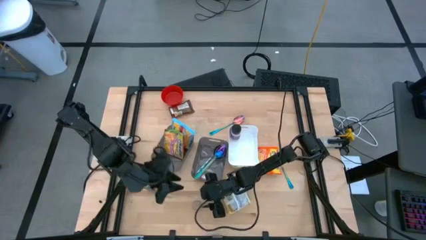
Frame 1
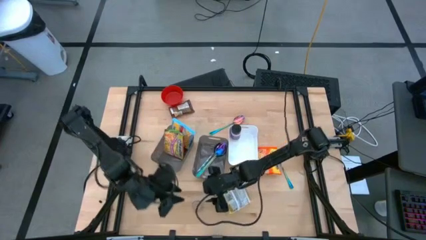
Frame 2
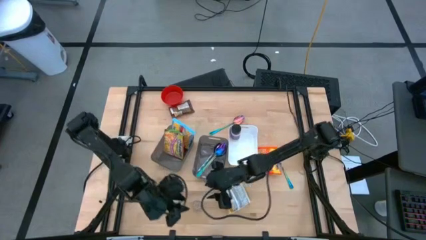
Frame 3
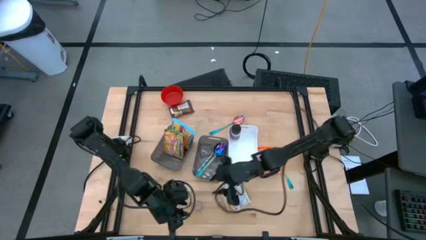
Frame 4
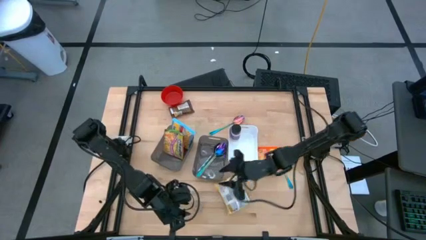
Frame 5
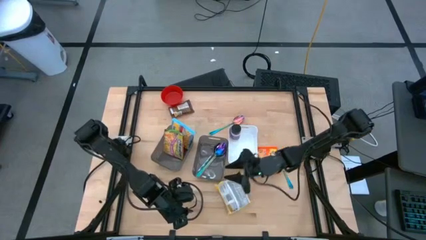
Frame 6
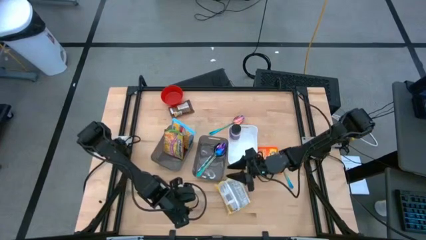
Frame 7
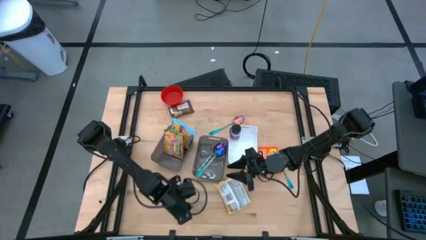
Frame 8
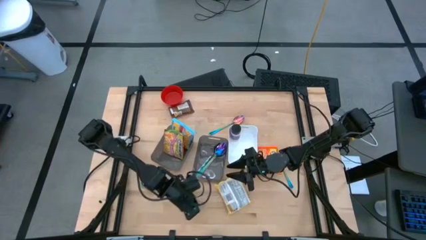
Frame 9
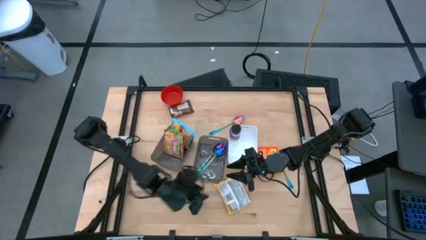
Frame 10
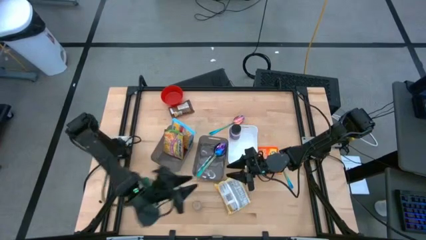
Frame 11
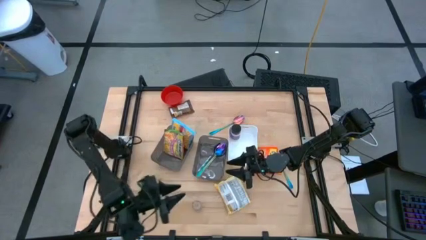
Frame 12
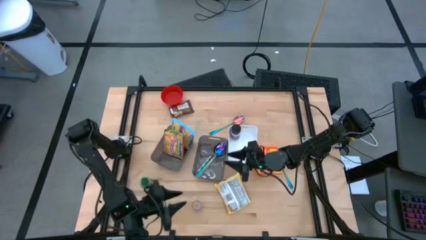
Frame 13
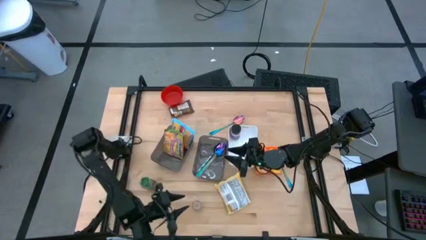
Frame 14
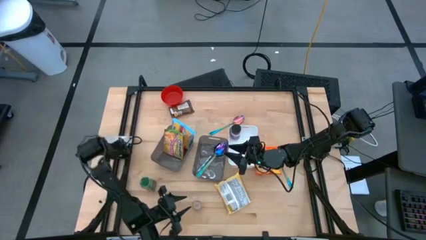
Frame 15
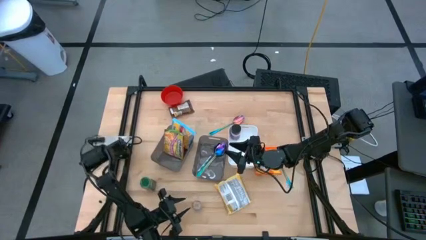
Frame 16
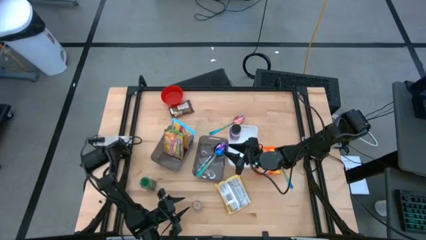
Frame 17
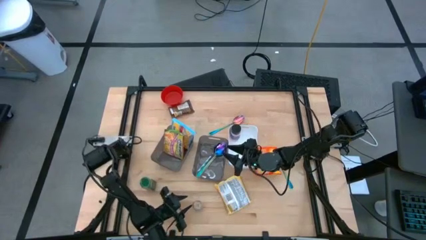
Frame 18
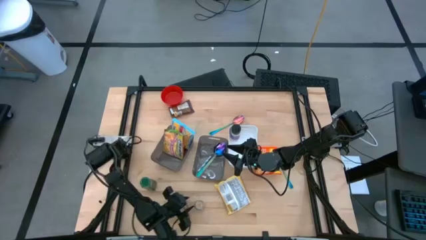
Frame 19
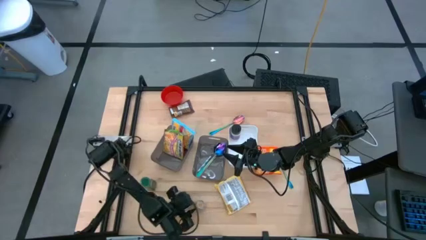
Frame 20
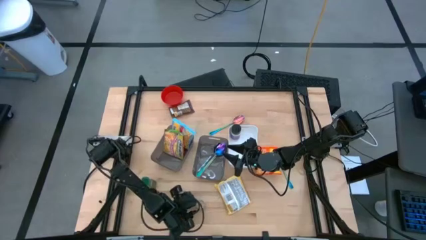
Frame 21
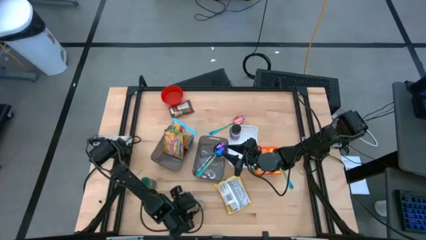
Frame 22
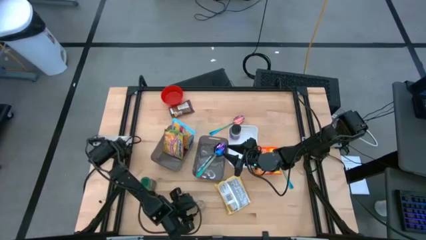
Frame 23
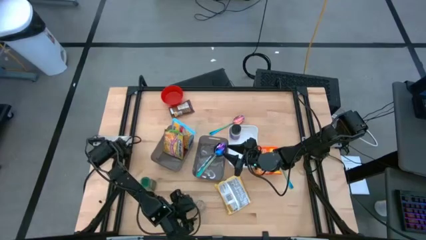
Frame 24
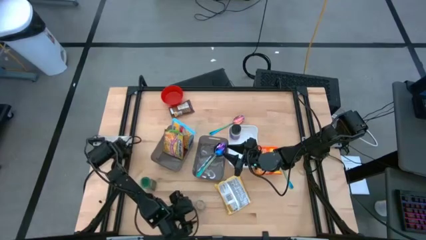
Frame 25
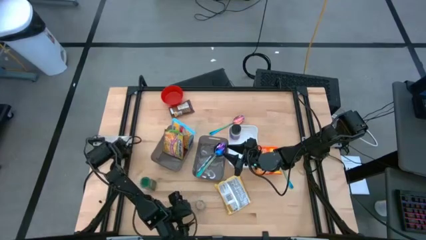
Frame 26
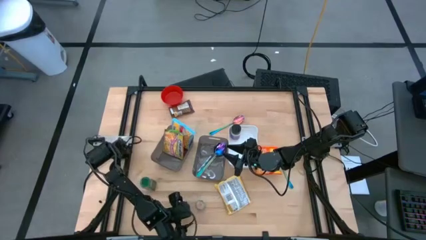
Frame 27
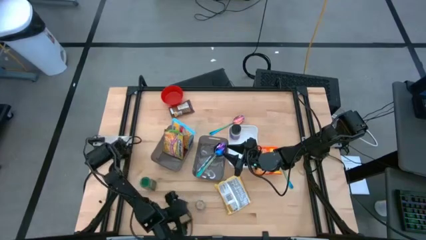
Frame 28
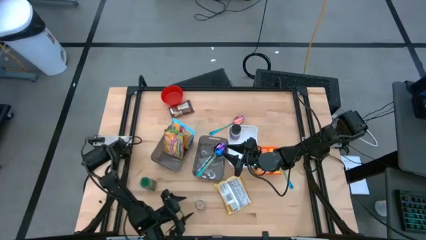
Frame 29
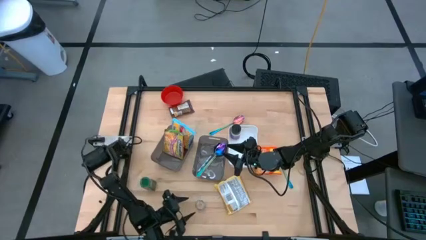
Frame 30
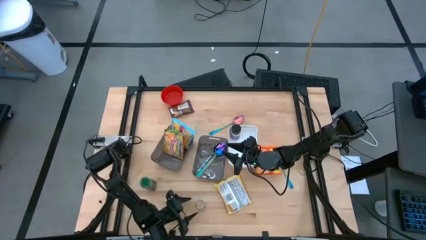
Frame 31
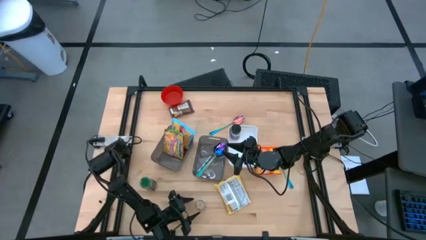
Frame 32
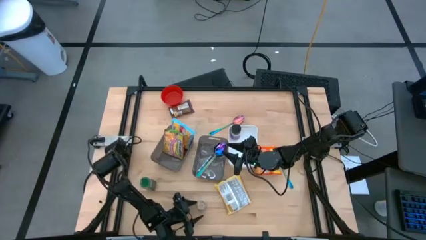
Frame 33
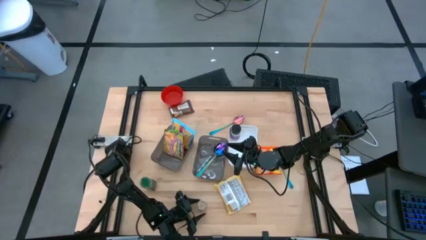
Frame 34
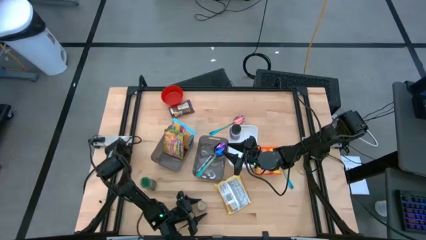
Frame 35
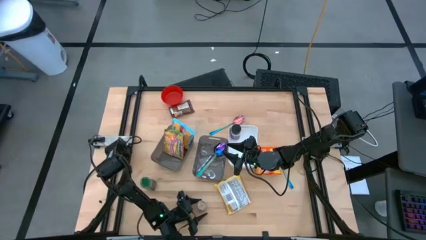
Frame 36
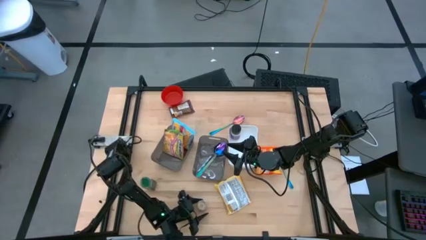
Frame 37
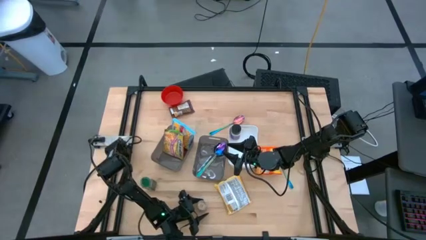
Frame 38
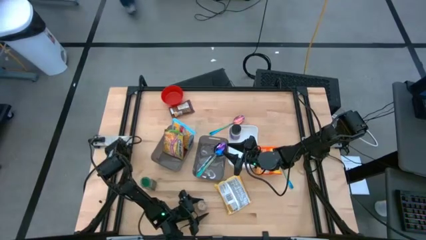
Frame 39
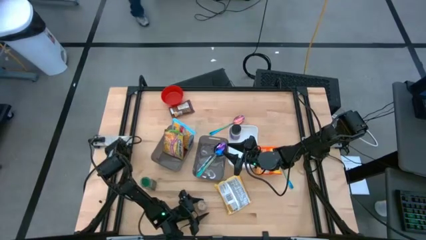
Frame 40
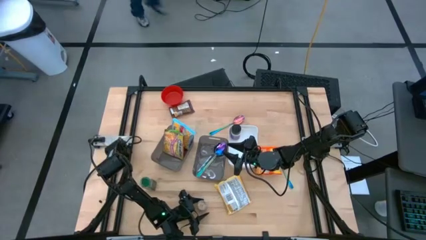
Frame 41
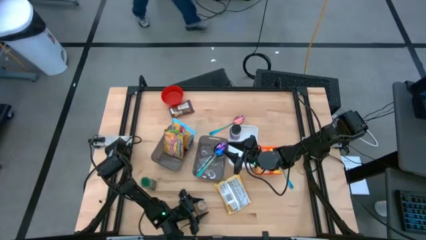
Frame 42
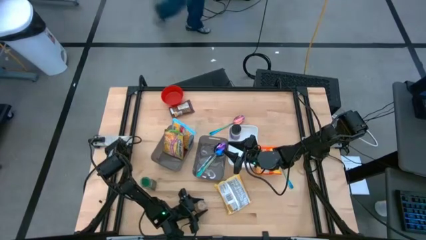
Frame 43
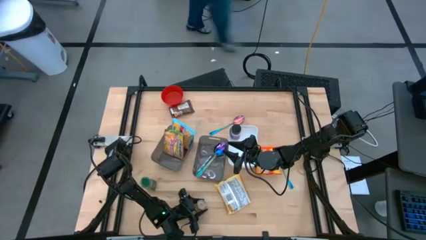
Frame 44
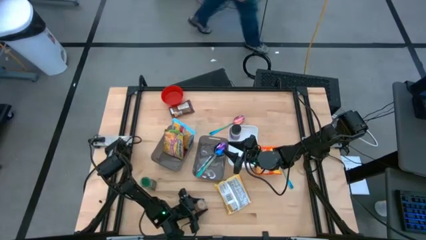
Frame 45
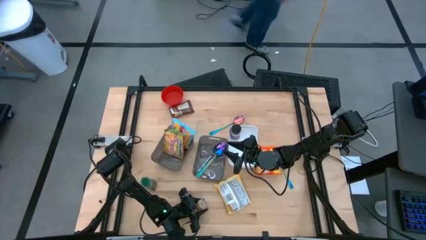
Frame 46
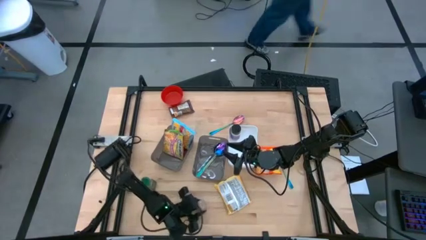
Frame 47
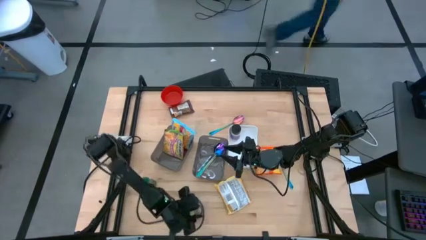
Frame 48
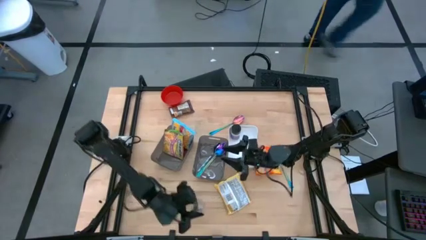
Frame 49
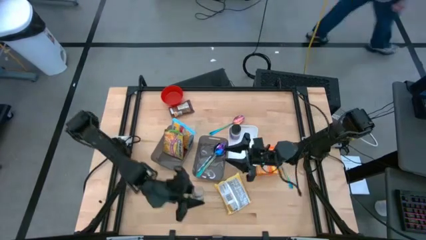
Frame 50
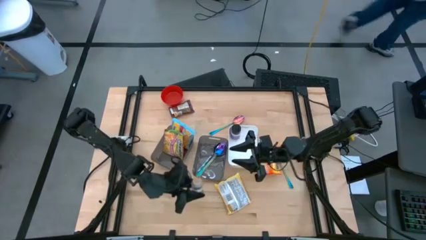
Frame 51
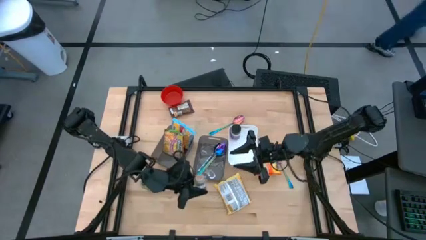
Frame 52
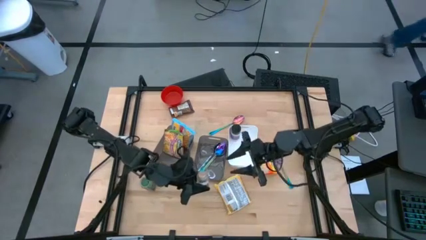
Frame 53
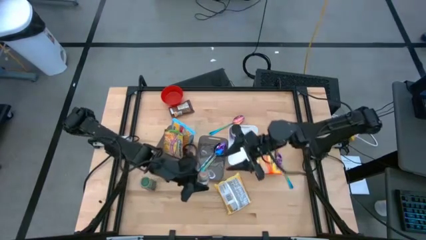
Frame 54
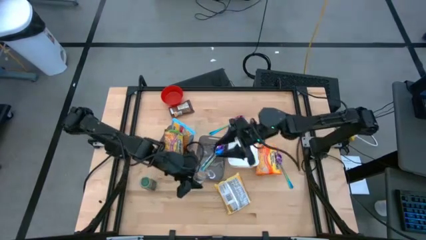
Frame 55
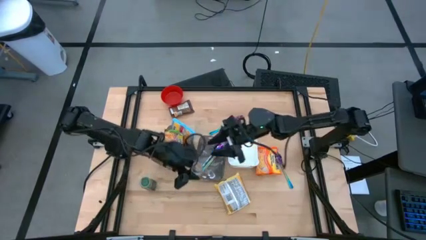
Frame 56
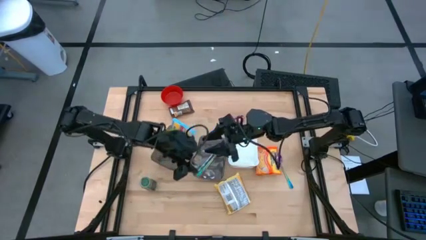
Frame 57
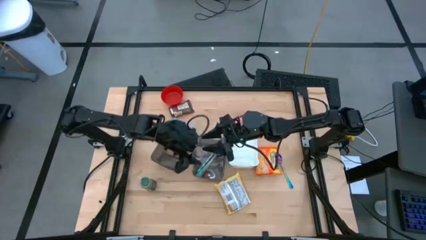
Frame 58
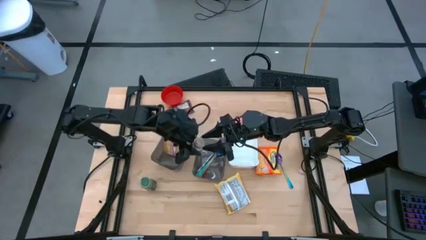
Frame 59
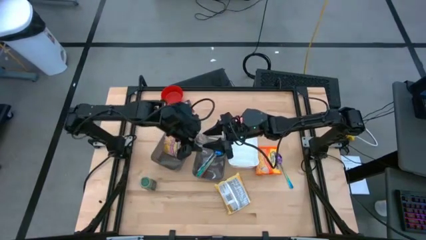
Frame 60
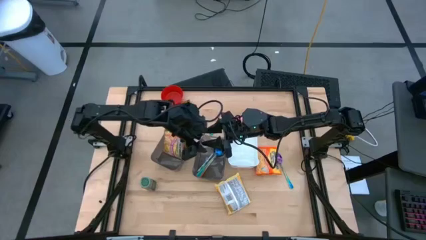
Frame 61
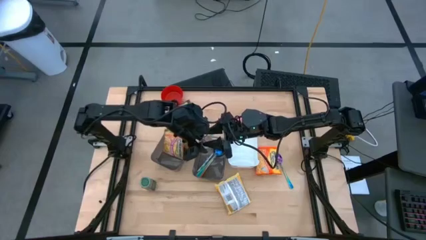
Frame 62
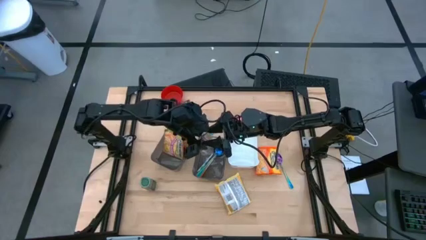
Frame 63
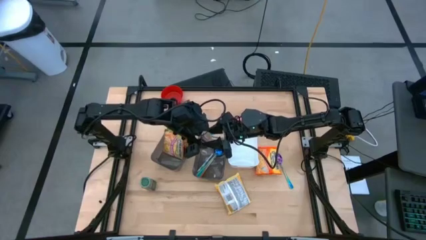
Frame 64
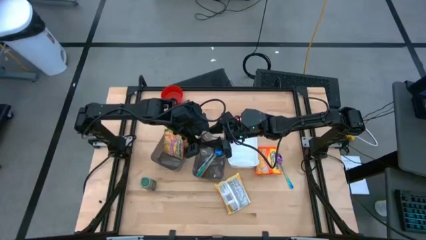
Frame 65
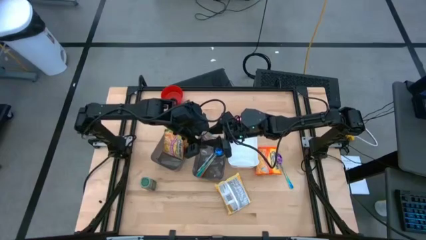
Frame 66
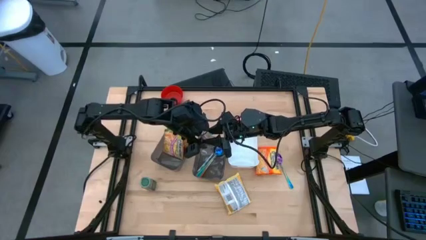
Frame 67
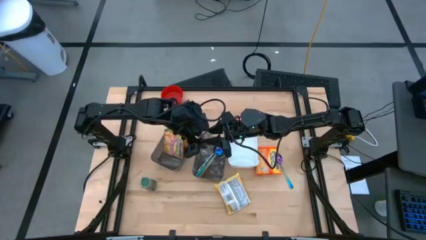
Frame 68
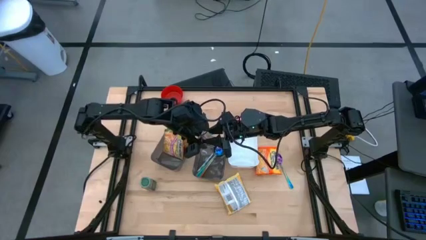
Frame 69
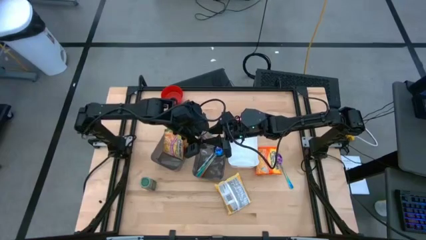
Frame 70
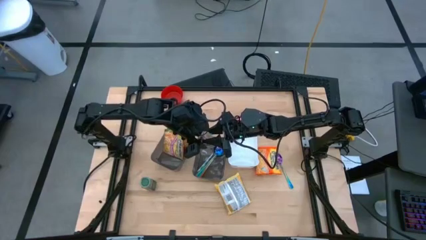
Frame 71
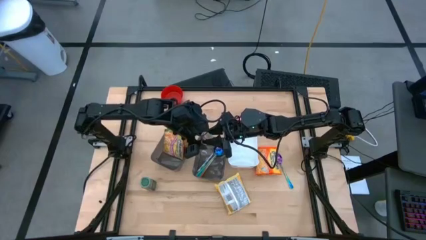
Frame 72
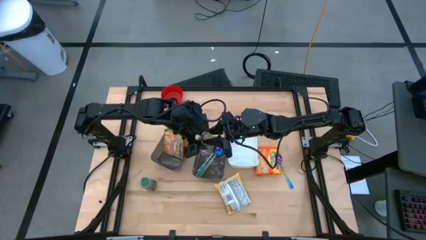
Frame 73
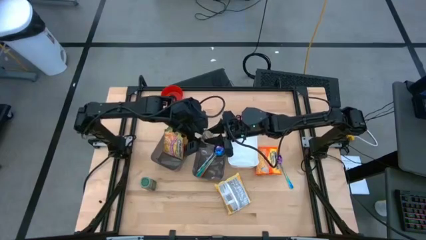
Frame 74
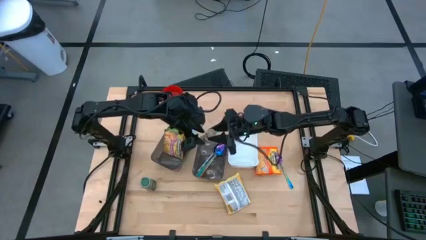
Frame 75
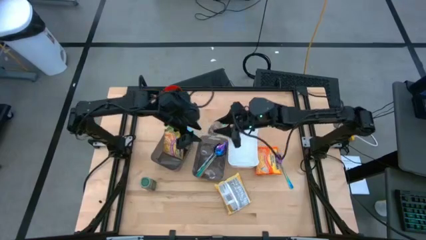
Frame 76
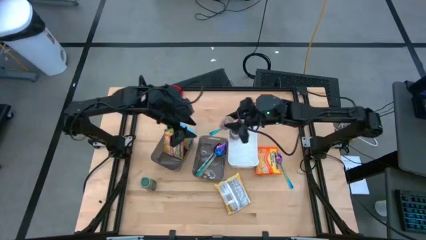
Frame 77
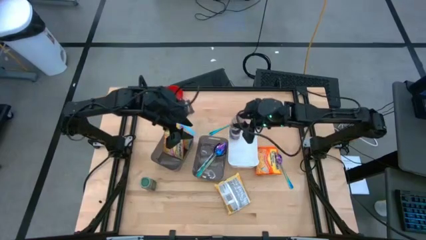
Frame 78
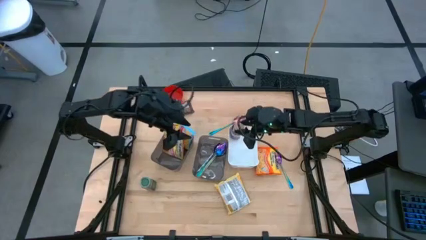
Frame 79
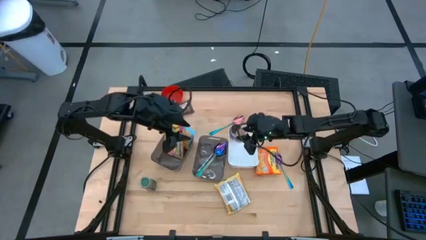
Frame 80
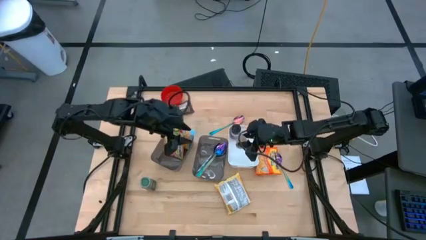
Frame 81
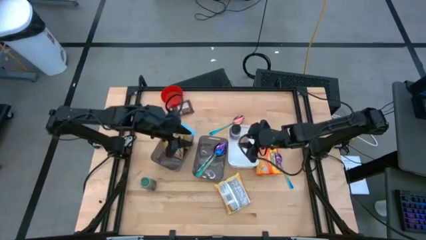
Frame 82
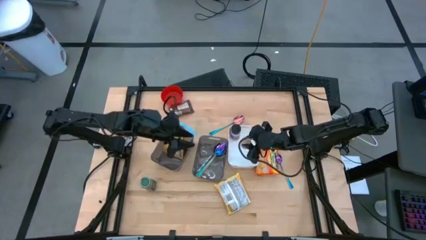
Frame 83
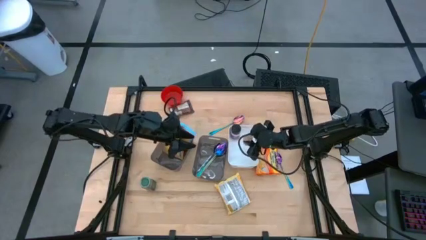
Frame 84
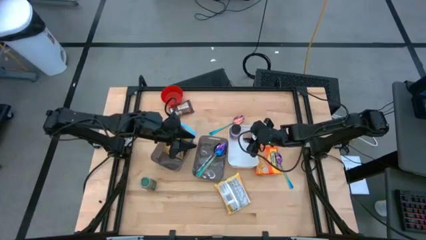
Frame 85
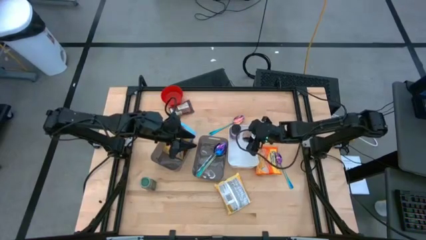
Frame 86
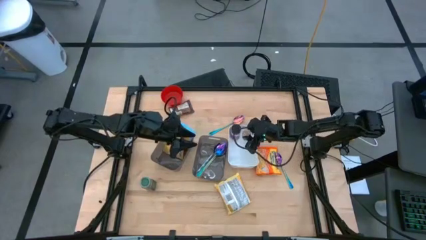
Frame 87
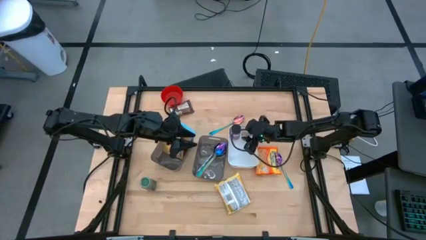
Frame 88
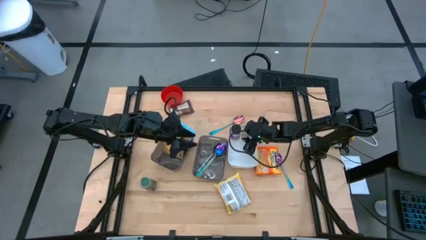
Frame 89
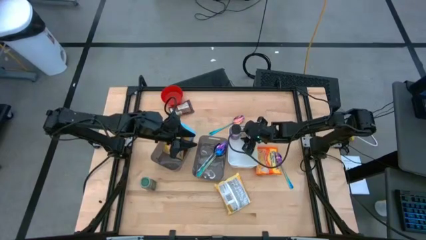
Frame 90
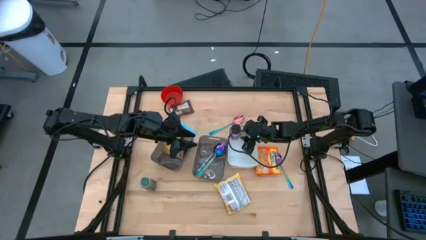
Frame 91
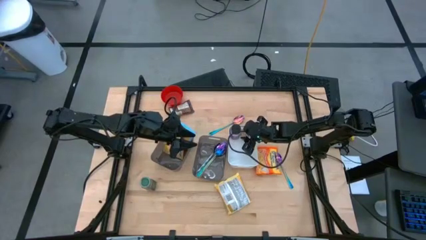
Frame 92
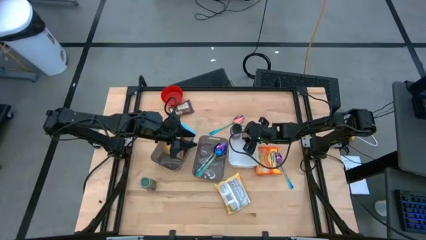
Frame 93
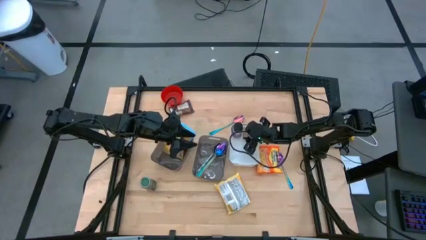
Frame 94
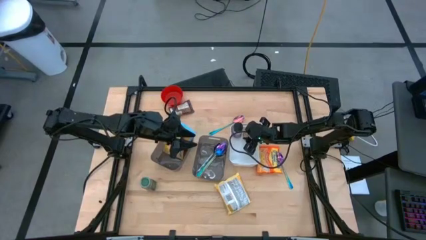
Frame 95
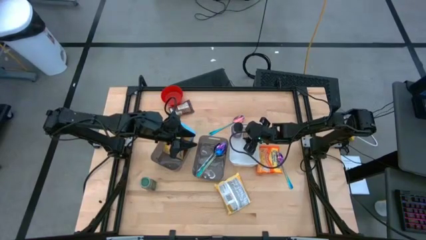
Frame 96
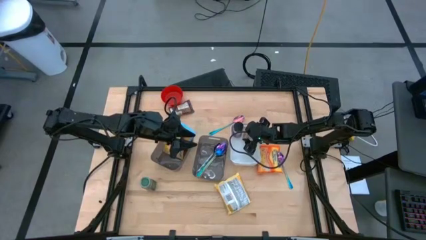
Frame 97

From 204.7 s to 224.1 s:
Task: Pick & Place Food Item
Put the brown bottle into the white bin
